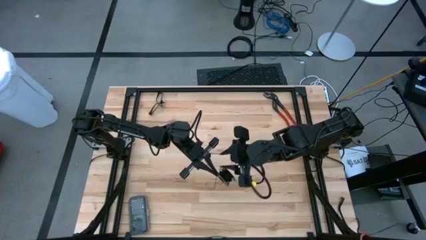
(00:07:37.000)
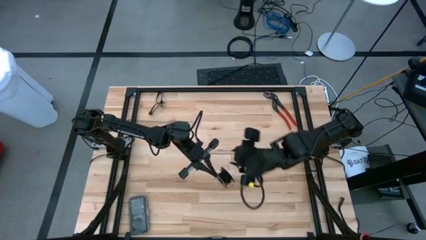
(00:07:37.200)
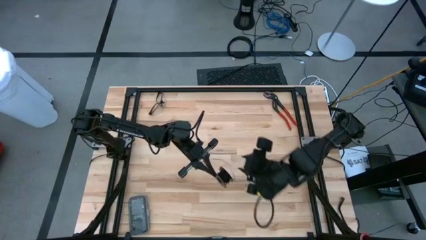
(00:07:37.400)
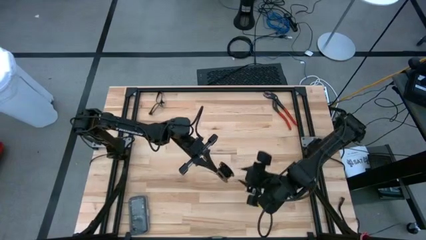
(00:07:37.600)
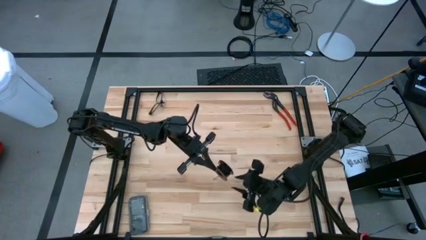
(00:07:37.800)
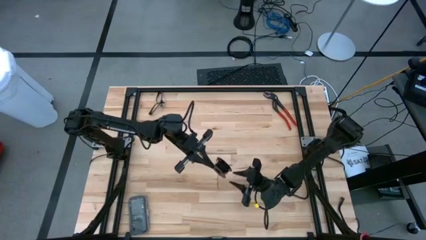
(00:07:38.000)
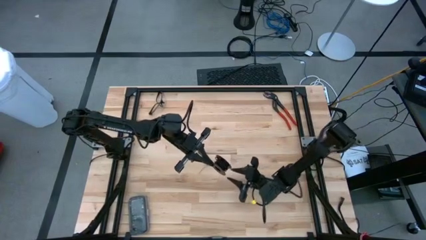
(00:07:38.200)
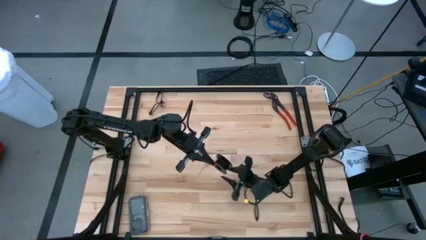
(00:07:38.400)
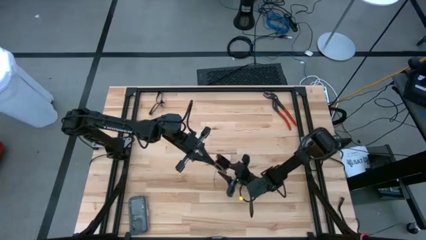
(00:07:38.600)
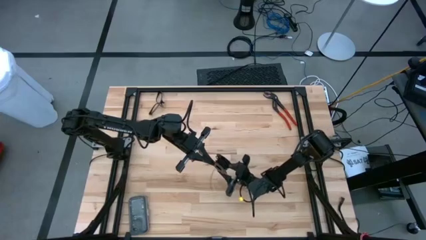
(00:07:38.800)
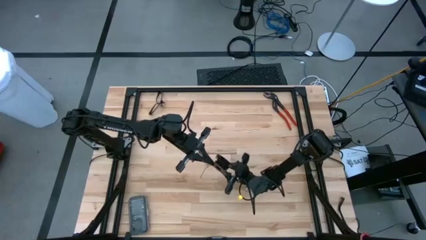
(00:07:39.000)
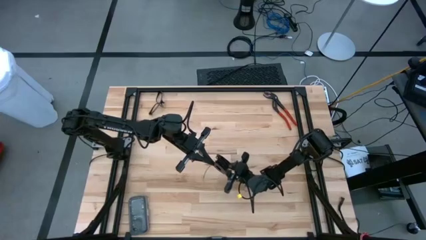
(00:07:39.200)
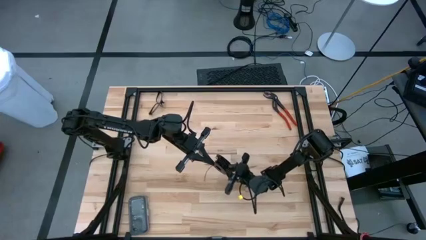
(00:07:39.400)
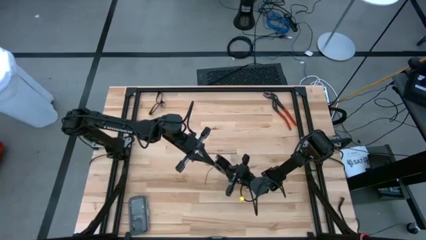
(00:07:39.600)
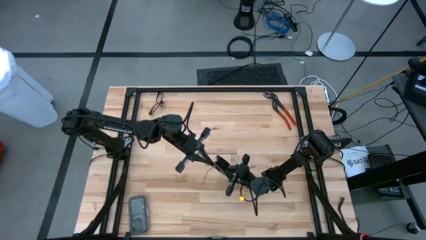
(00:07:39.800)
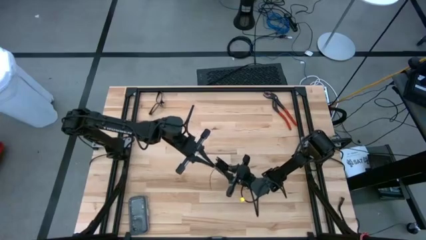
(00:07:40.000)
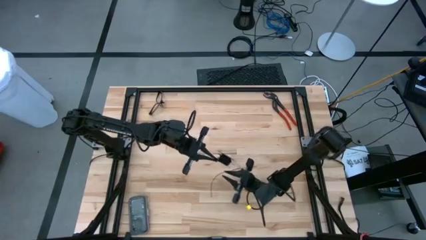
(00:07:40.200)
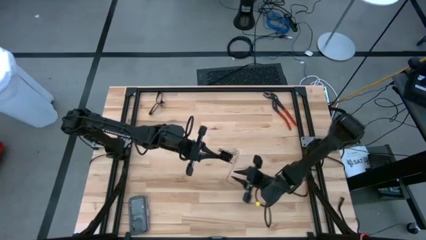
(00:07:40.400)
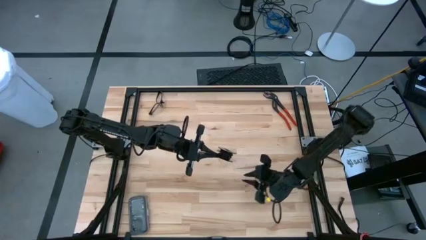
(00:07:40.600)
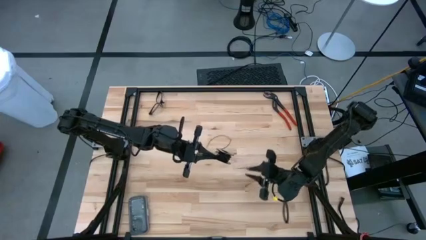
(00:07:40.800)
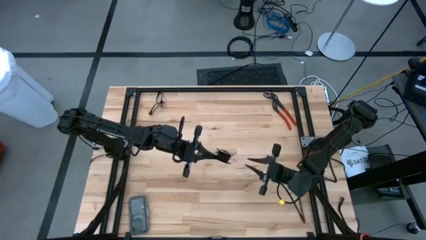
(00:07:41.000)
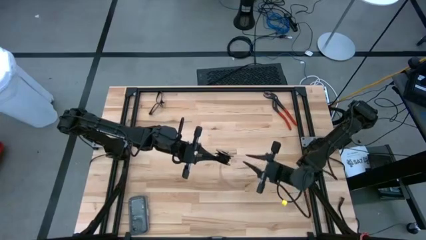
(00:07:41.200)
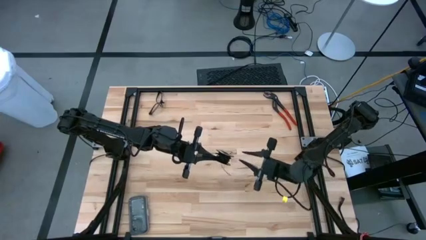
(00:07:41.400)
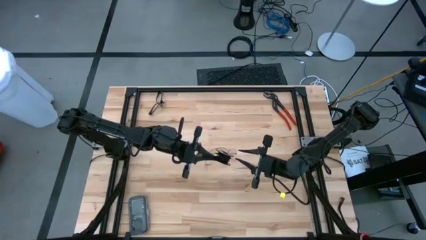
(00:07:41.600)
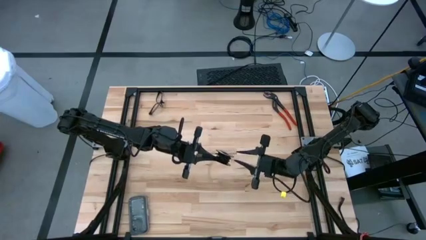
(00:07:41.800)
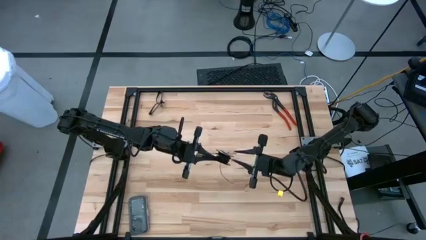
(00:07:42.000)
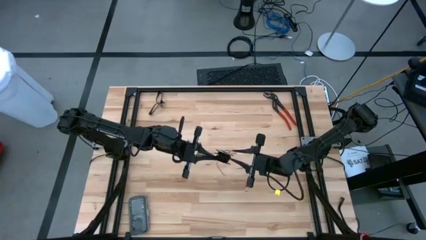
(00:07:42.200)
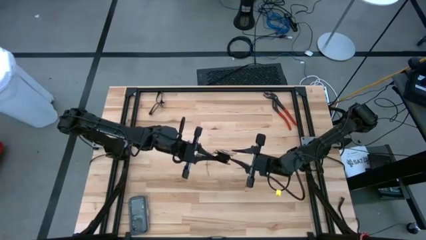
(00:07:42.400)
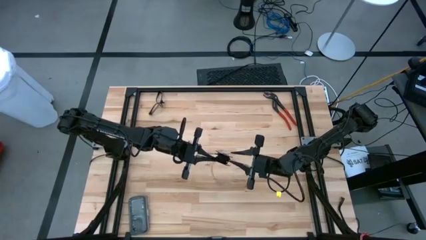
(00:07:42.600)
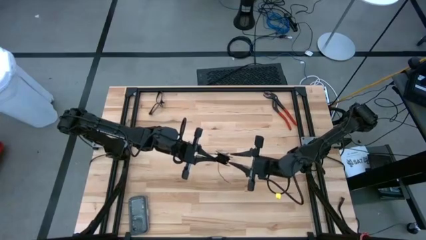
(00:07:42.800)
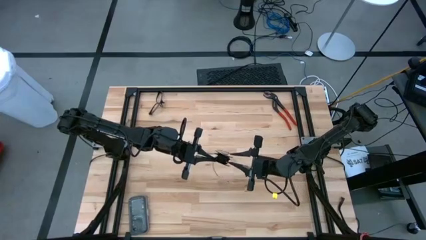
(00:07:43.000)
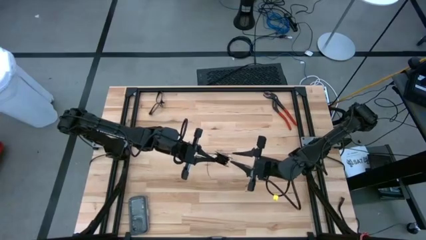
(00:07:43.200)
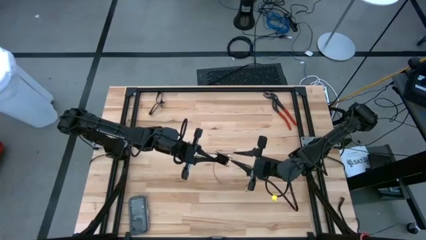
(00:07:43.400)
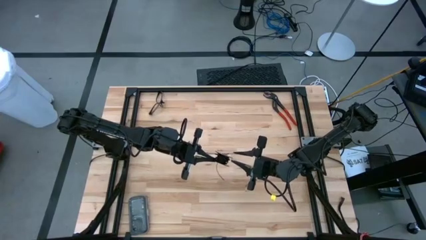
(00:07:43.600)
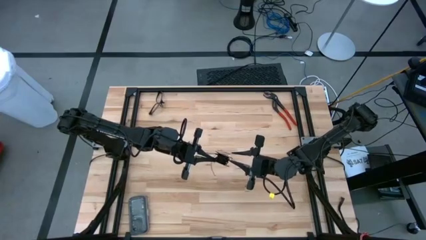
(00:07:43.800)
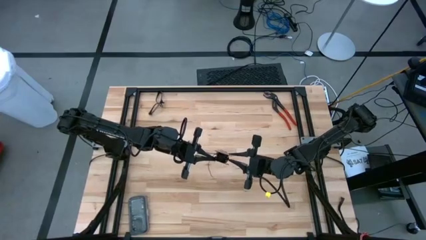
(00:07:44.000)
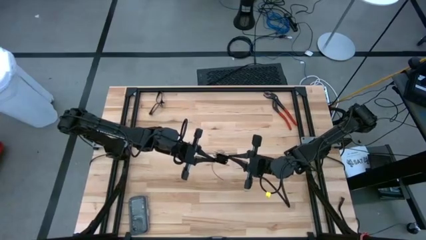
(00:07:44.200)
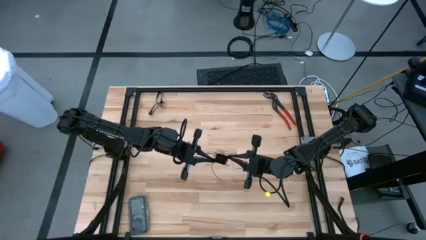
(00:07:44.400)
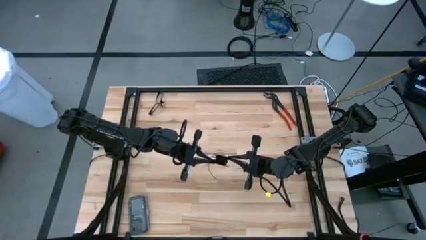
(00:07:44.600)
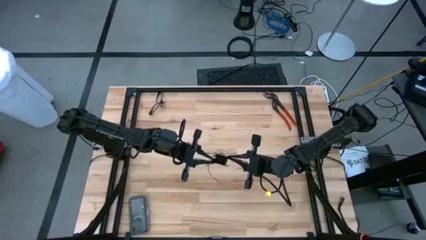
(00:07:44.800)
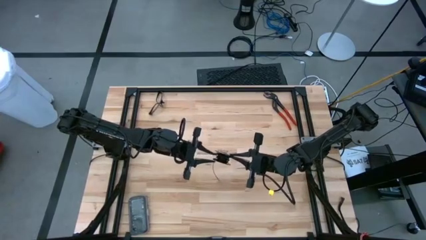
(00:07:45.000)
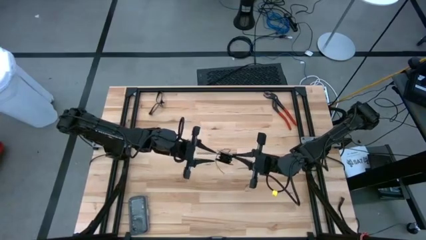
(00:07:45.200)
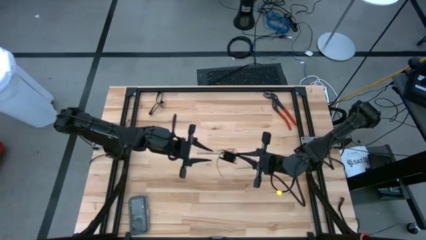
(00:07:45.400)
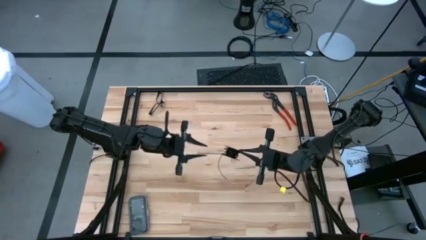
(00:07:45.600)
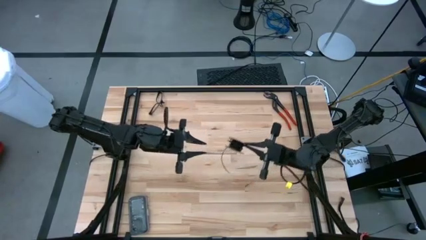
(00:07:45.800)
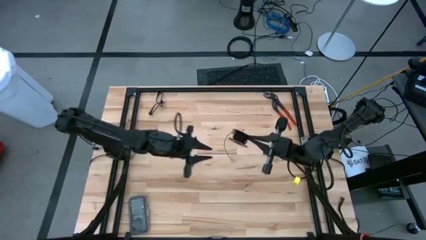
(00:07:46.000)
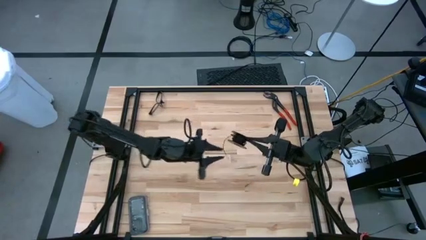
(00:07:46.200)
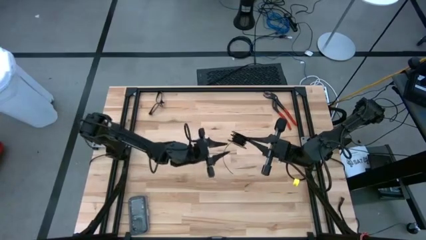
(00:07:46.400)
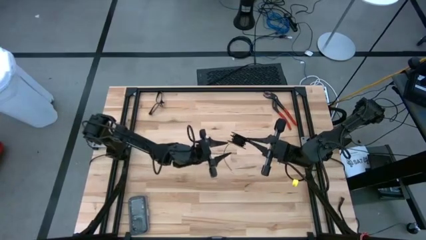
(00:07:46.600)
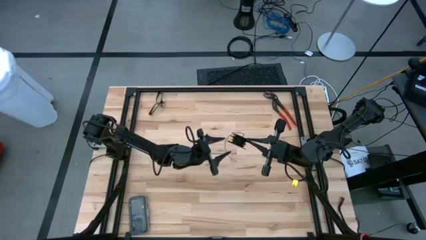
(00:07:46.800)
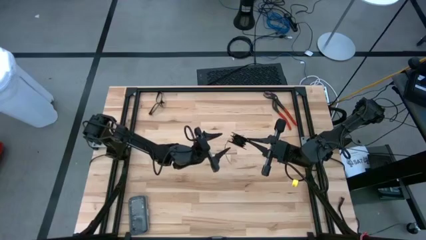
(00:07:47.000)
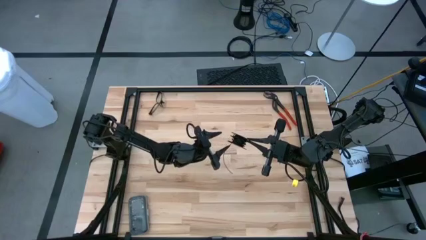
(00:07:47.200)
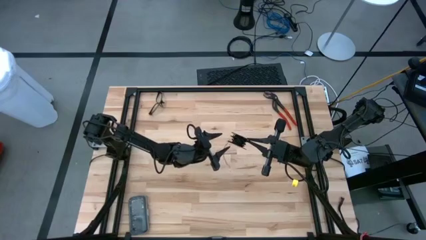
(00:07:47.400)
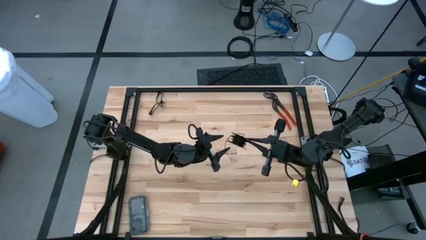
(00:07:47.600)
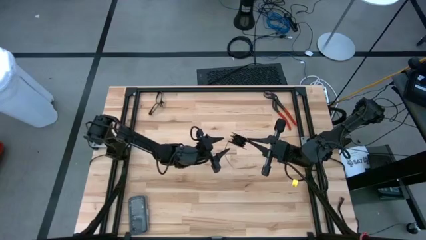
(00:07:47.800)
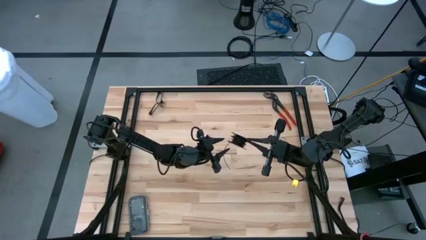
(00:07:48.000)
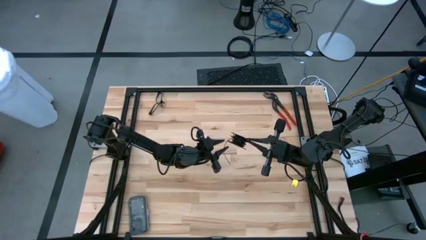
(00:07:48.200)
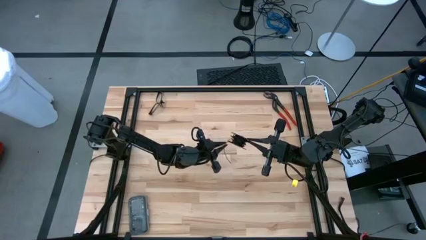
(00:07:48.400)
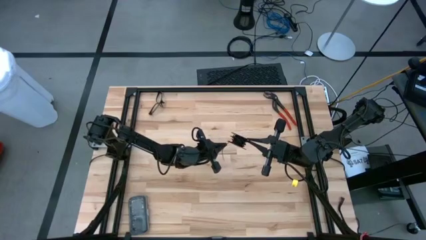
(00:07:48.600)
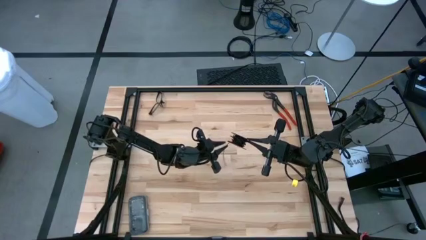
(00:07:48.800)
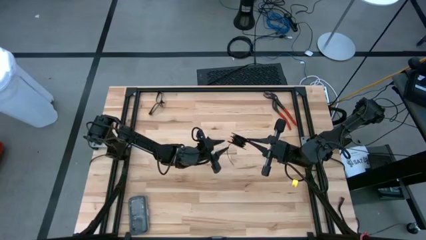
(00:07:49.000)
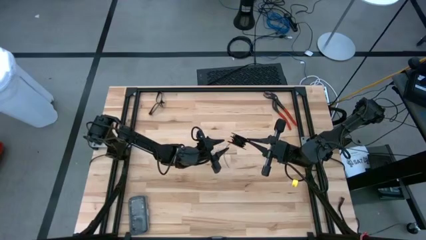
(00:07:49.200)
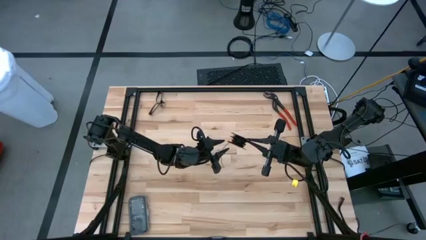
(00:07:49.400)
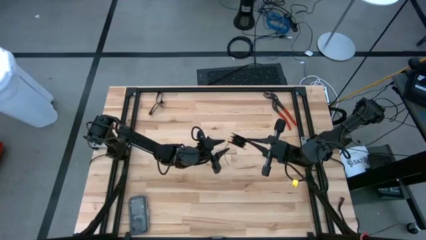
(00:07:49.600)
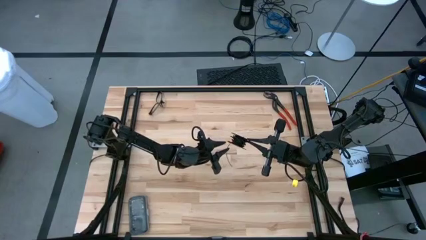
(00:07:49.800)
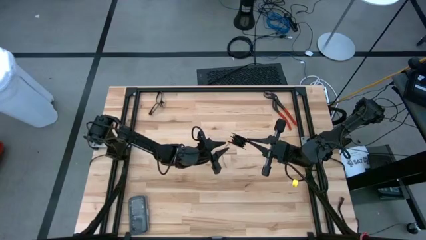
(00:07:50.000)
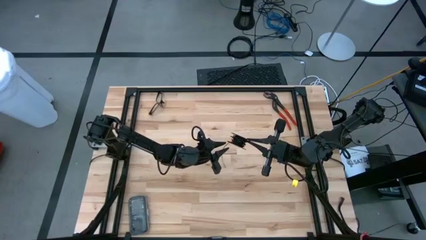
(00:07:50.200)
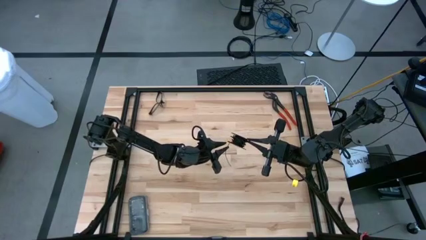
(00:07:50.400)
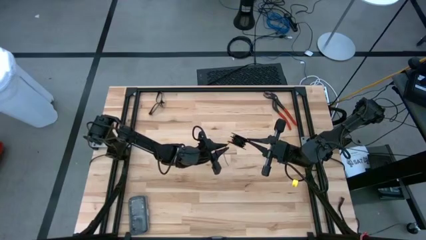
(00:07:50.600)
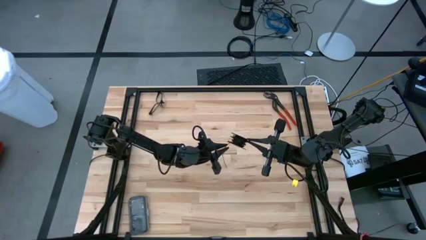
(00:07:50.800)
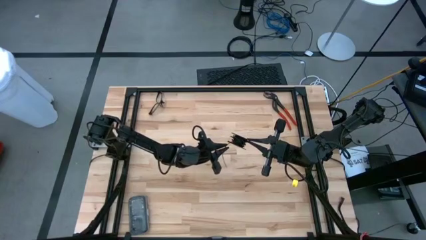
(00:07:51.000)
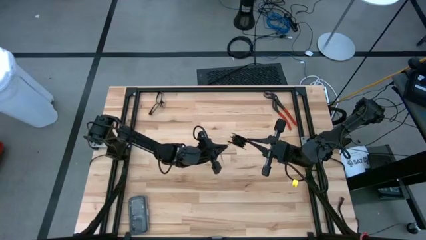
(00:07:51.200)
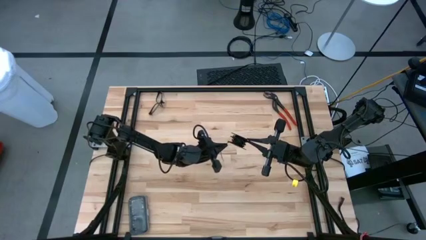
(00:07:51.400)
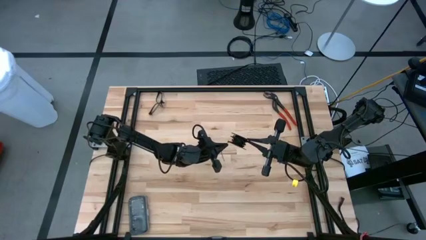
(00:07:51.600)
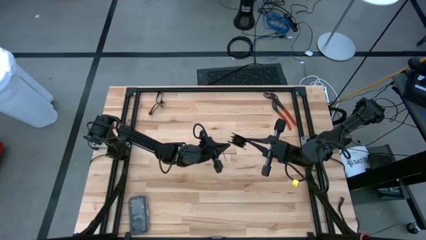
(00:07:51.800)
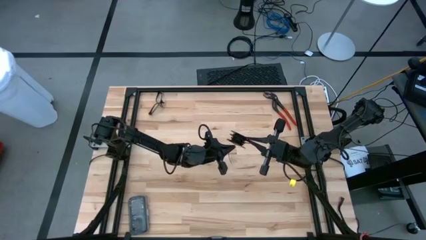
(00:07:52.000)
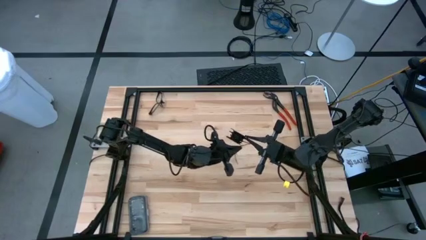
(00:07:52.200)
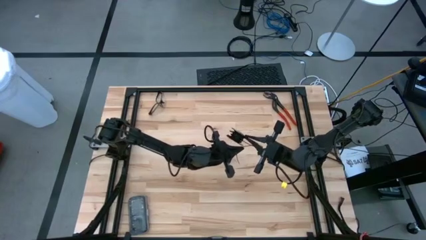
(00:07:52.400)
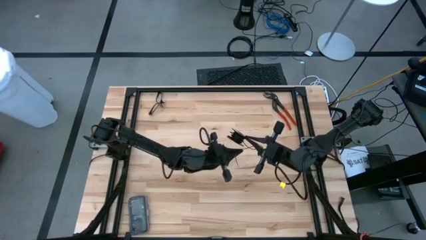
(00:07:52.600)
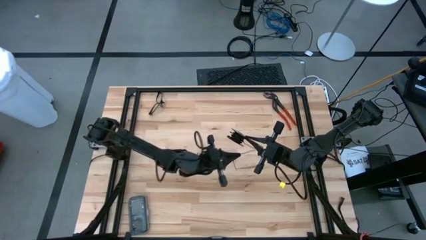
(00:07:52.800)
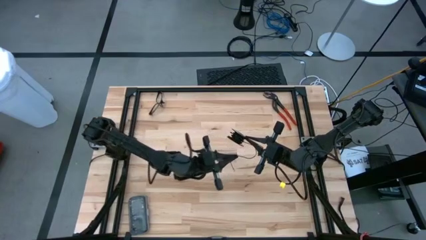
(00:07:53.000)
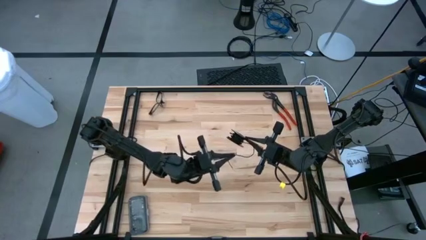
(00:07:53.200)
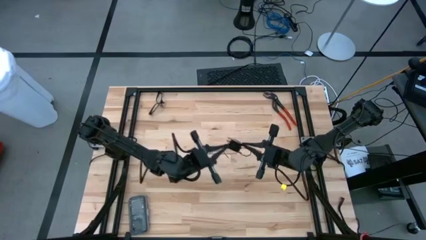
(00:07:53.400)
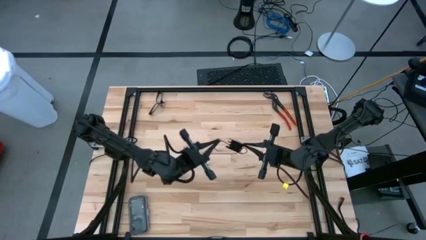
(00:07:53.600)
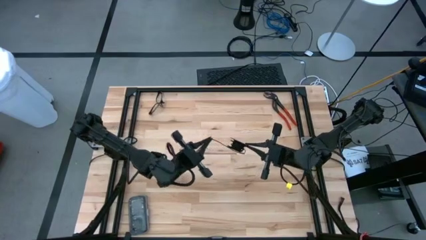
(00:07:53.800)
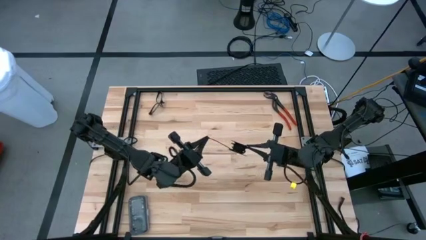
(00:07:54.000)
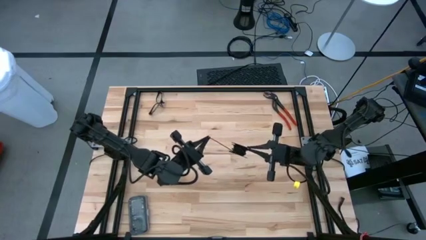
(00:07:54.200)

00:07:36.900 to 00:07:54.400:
Task: Coil cords
Coil the black wire onto the spool
